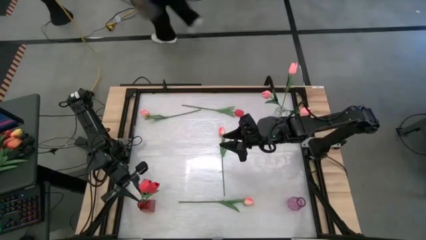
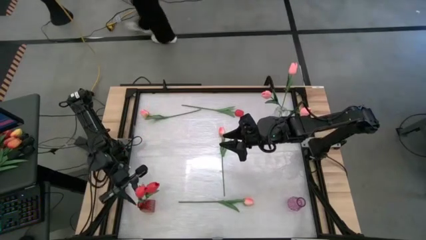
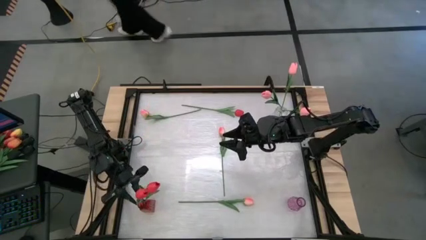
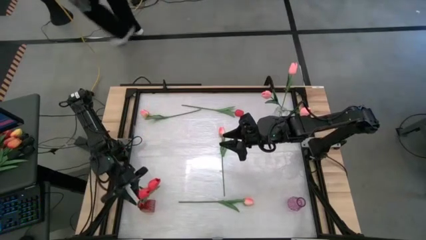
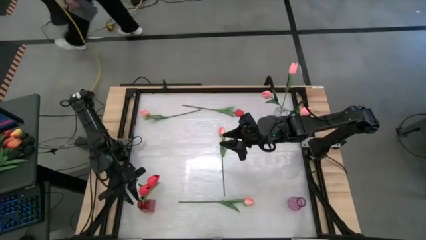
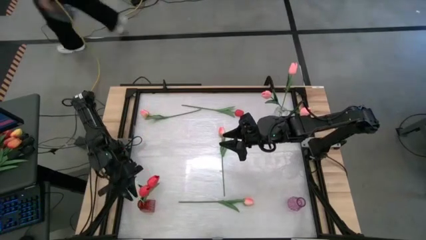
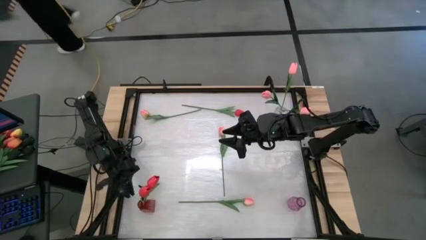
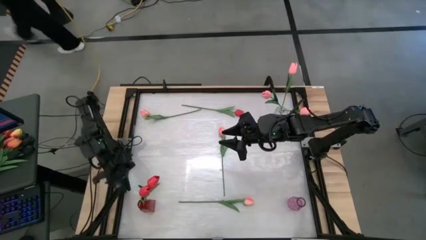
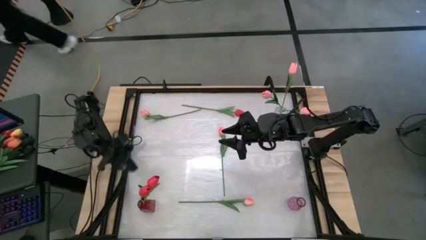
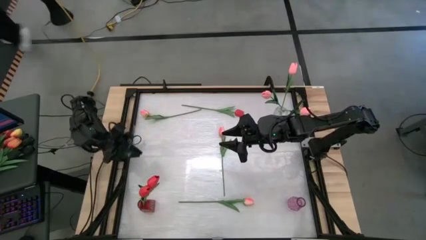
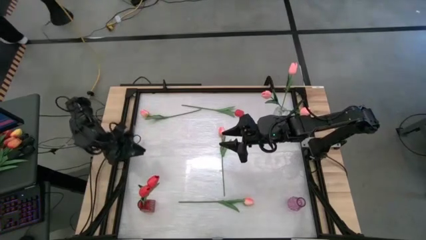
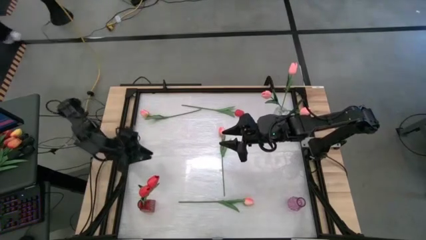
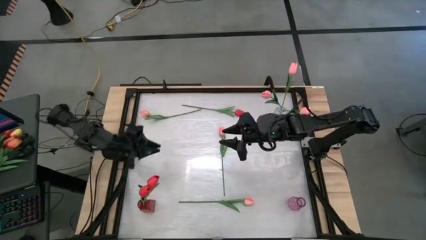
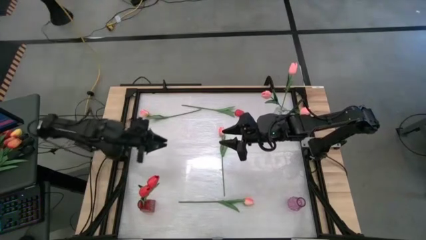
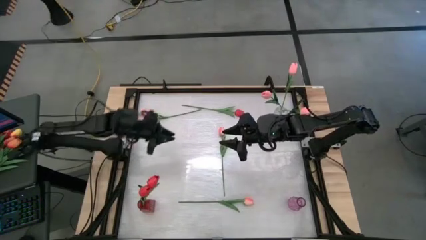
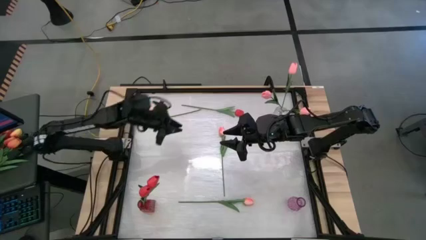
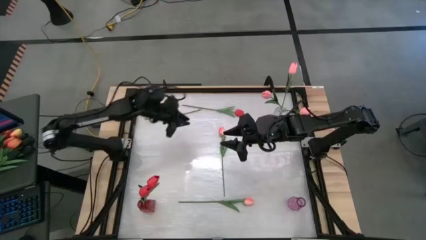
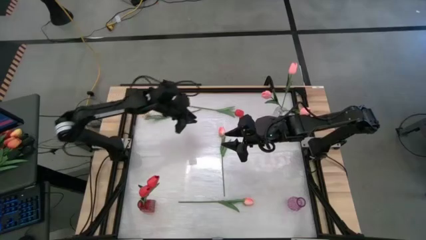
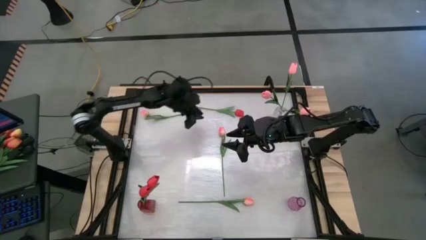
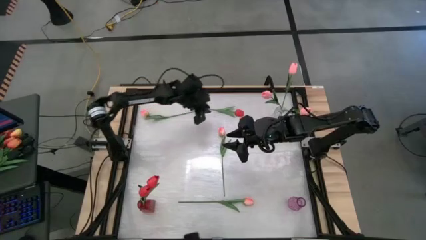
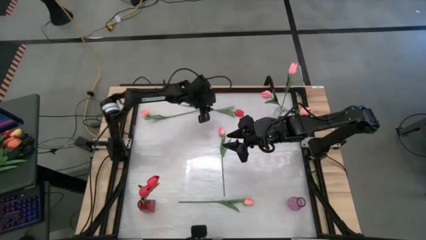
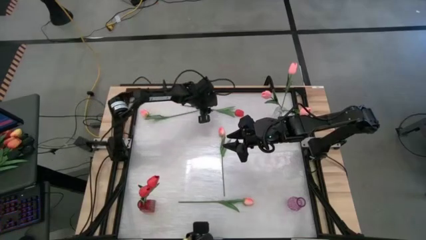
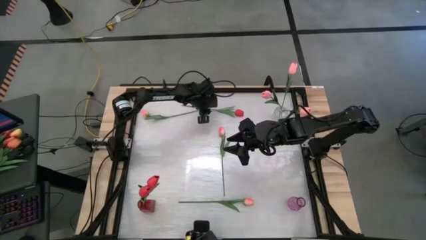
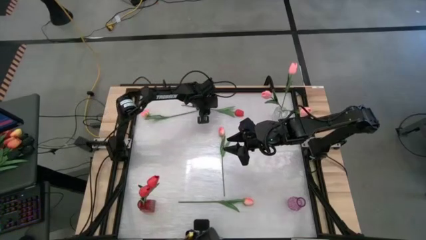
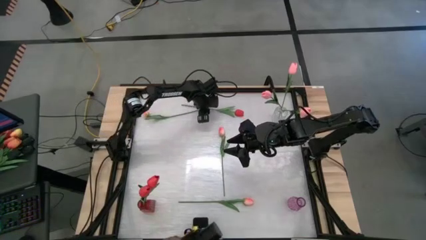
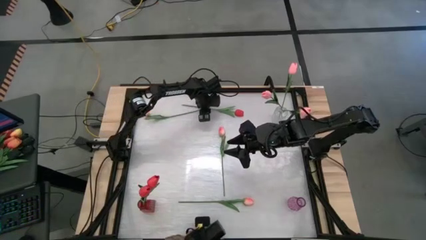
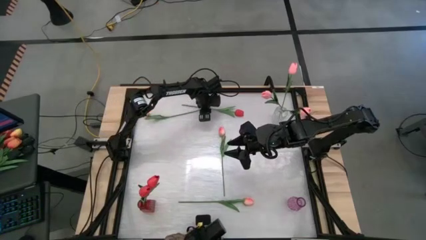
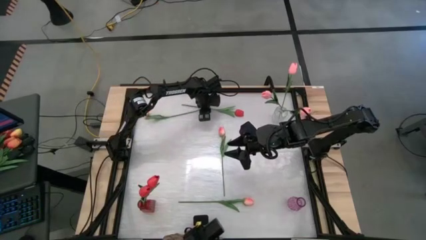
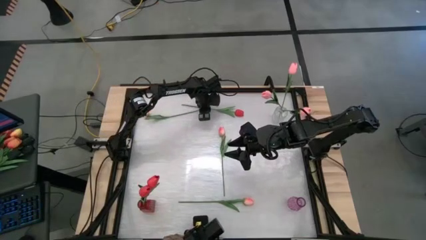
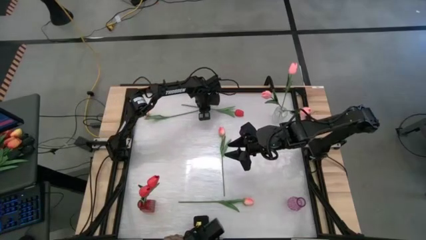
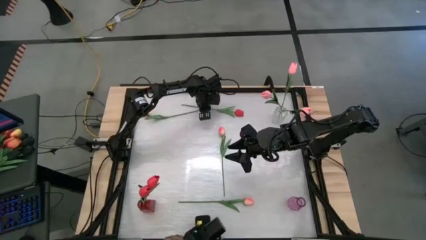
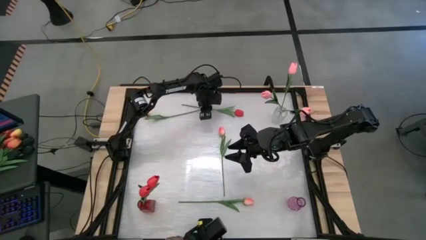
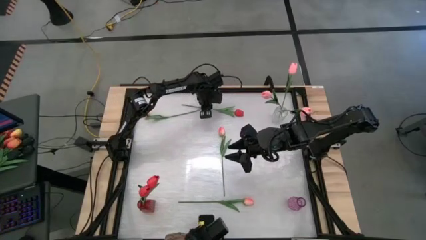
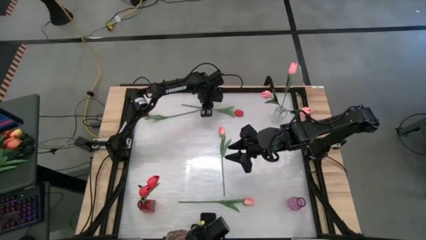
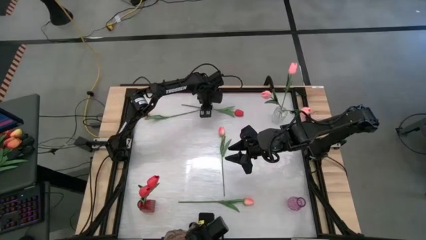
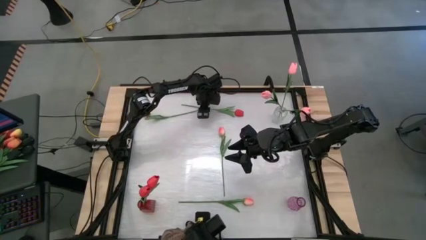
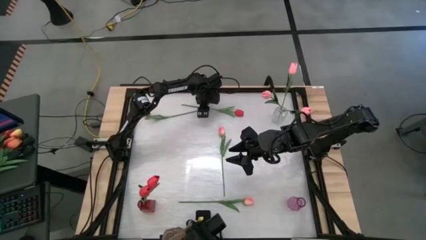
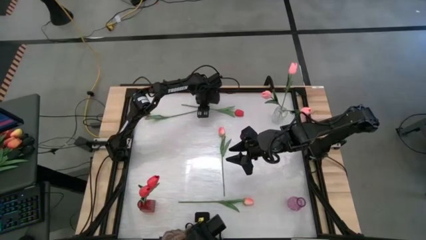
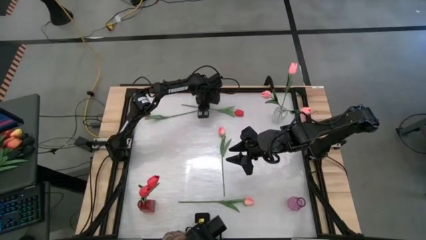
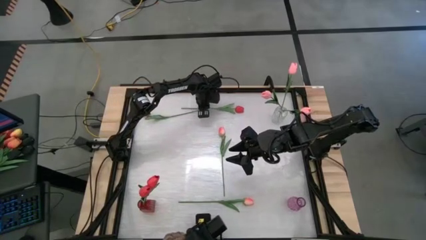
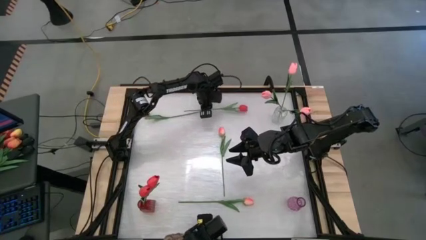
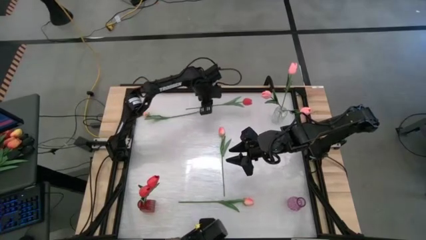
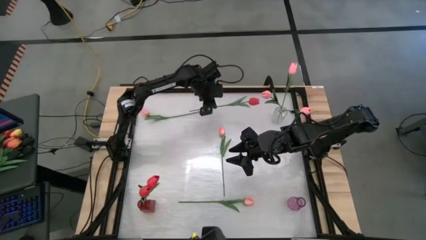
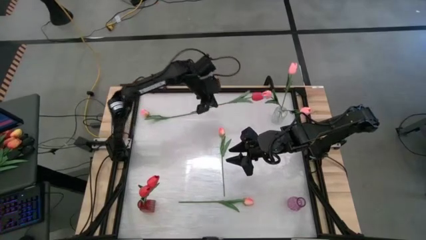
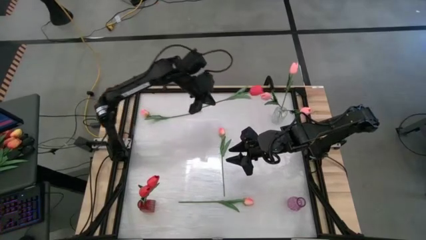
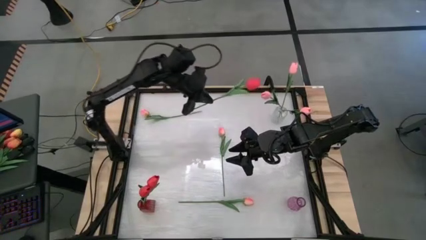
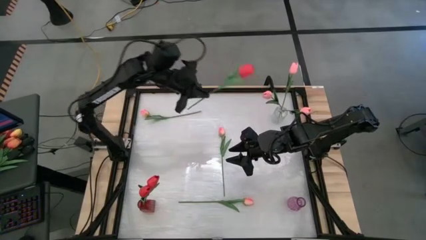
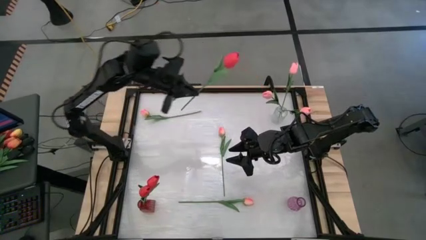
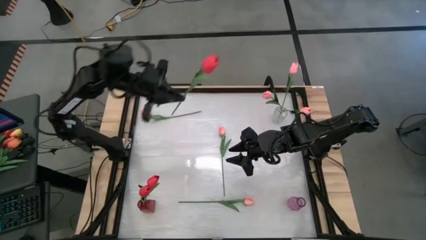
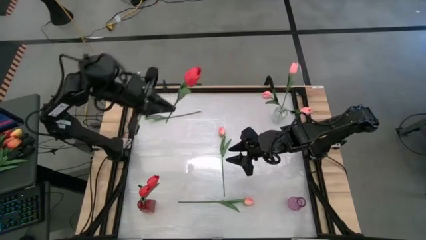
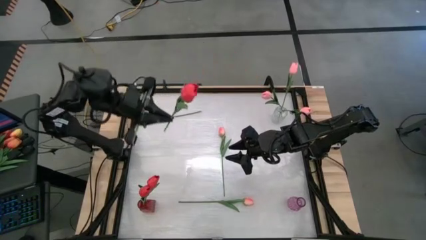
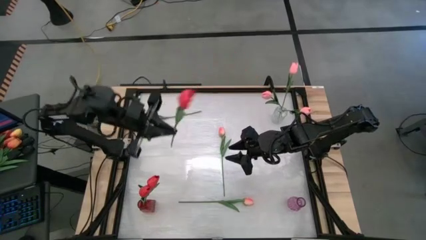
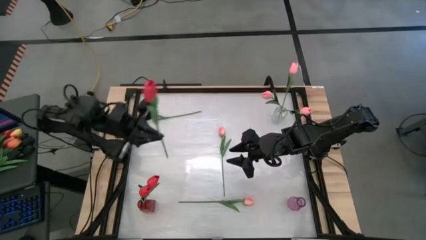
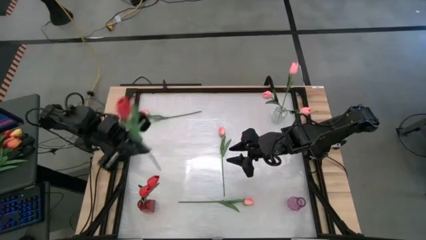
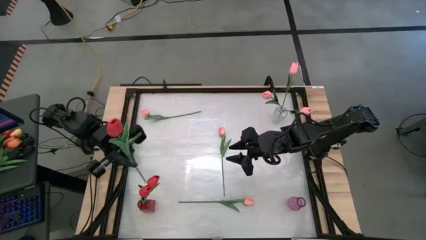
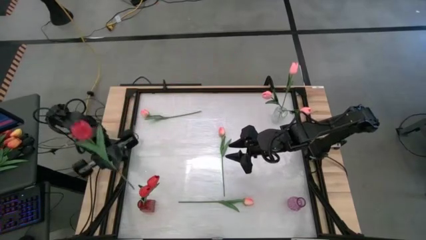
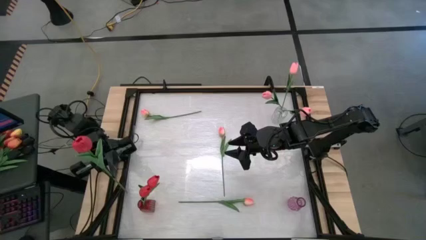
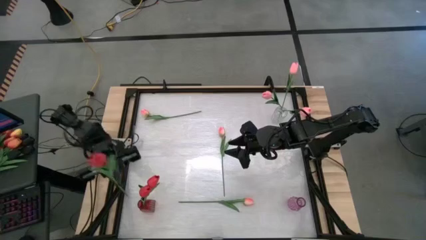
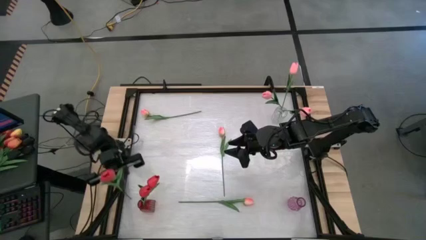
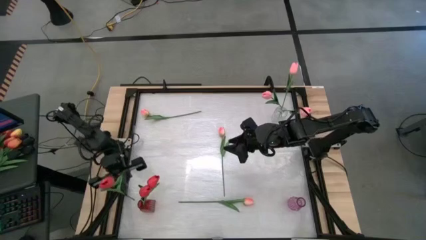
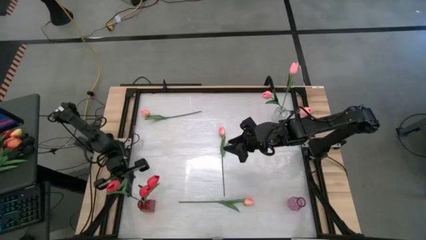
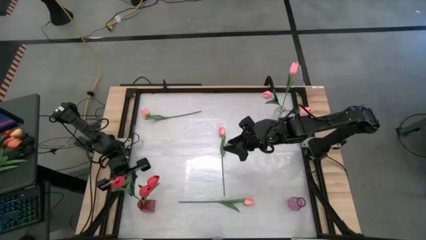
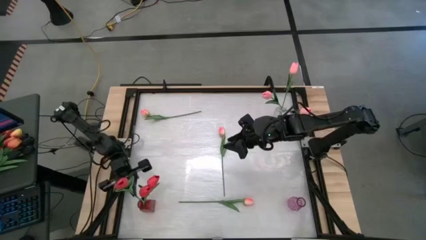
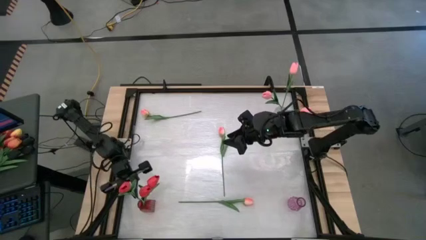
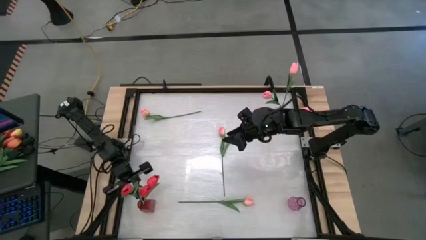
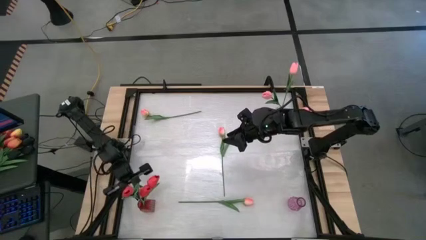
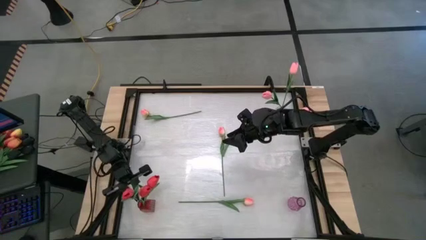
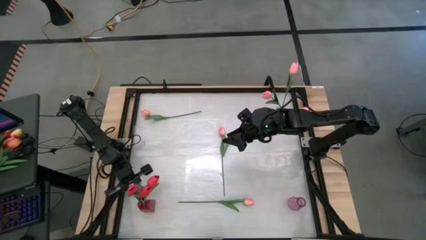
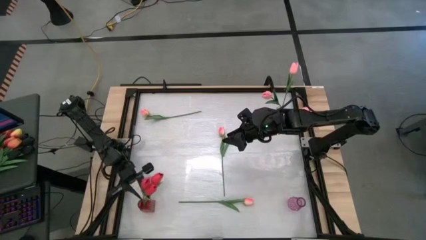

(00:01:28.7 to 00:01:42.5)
Task: Sort flowers into vase by color
Put the red flower in the red vase
